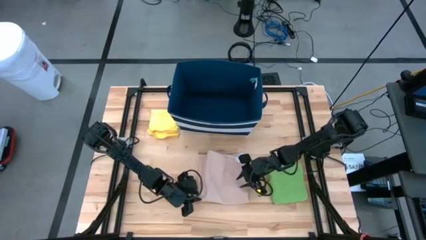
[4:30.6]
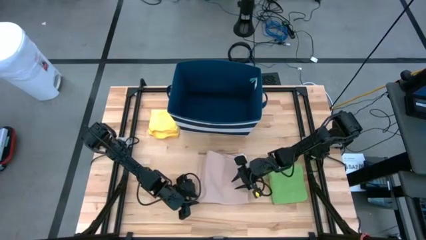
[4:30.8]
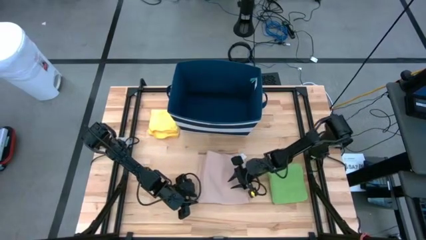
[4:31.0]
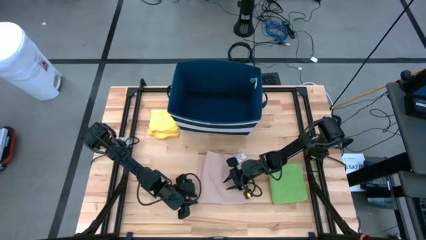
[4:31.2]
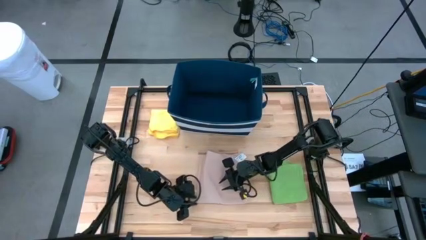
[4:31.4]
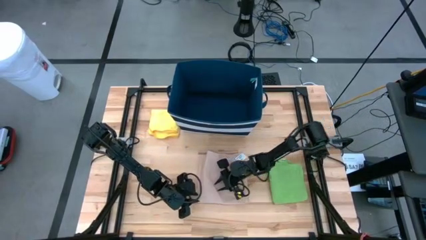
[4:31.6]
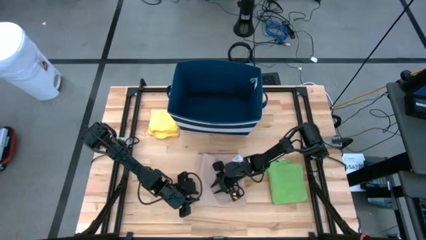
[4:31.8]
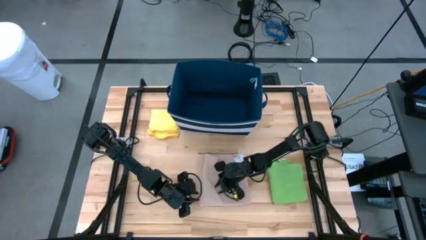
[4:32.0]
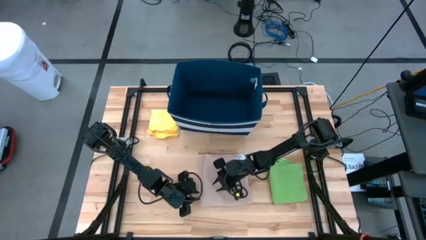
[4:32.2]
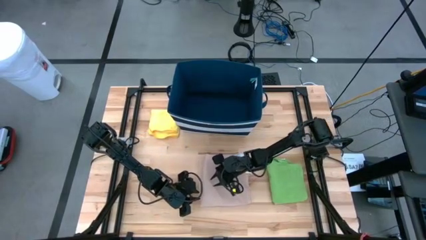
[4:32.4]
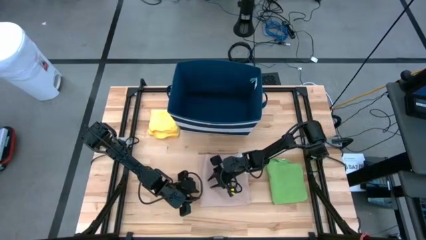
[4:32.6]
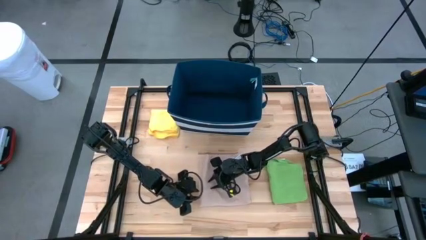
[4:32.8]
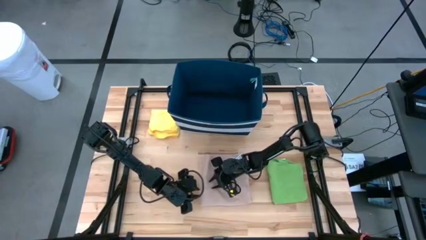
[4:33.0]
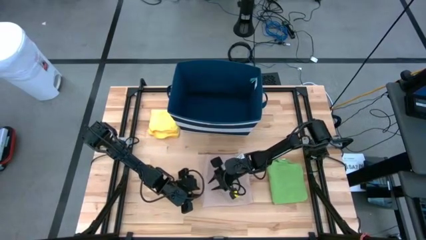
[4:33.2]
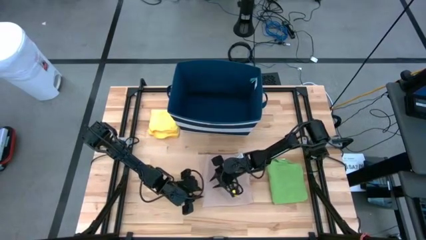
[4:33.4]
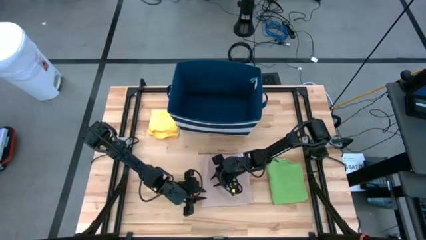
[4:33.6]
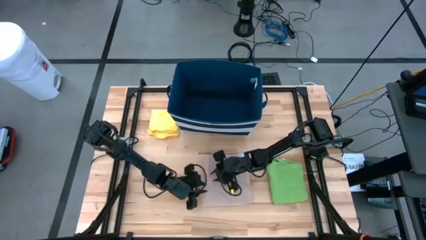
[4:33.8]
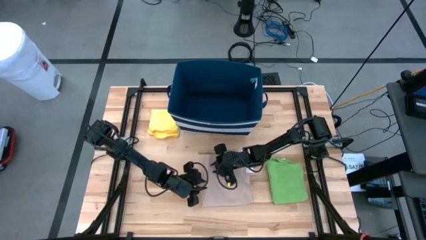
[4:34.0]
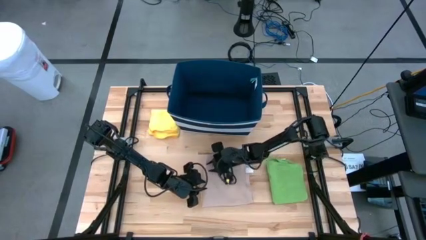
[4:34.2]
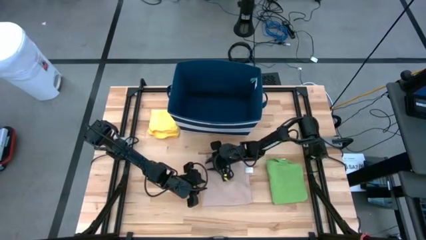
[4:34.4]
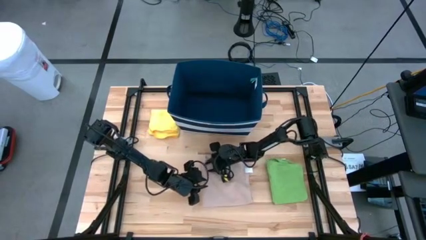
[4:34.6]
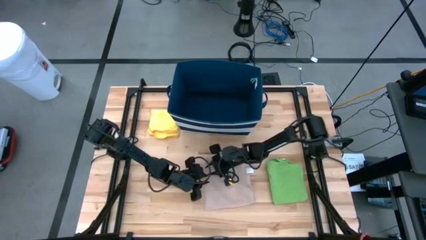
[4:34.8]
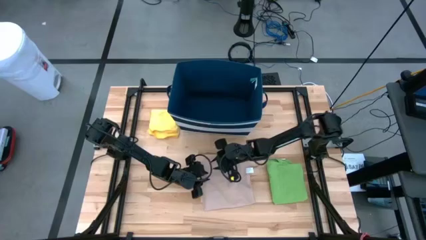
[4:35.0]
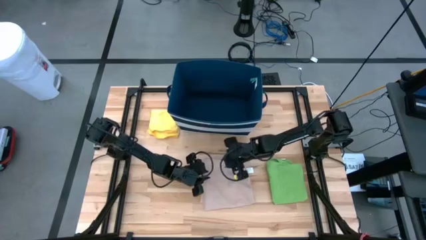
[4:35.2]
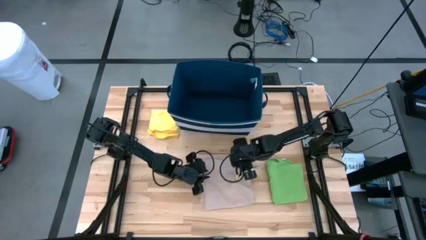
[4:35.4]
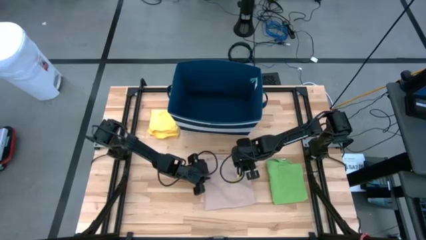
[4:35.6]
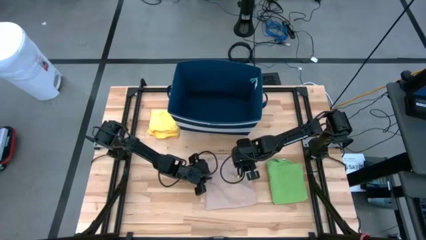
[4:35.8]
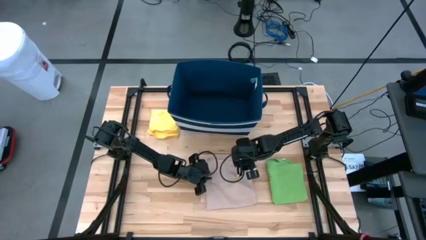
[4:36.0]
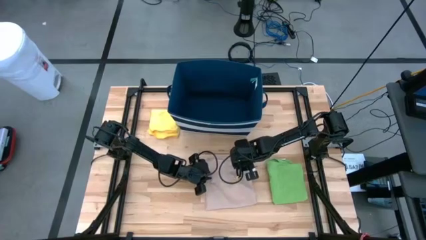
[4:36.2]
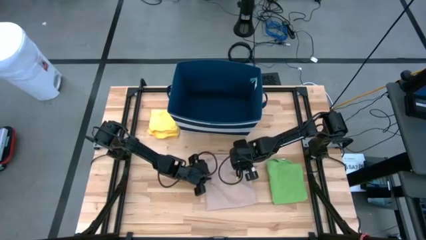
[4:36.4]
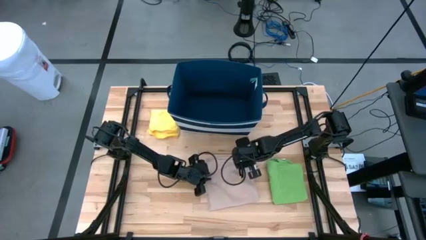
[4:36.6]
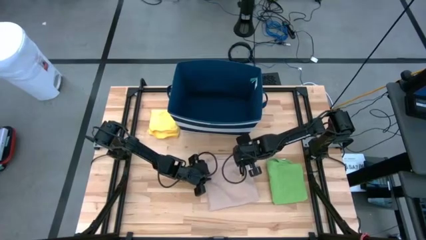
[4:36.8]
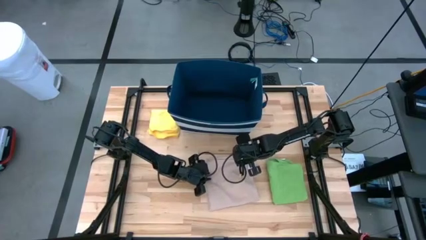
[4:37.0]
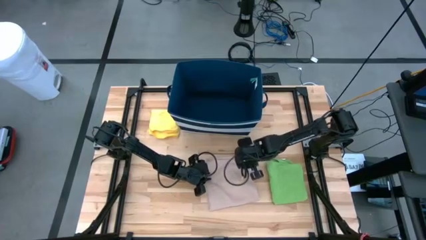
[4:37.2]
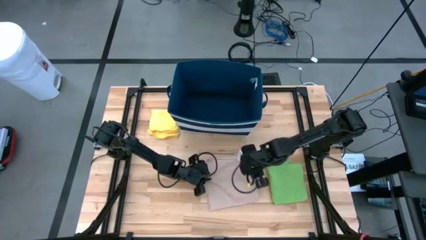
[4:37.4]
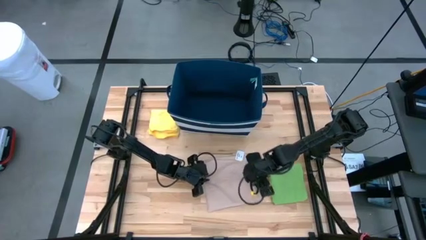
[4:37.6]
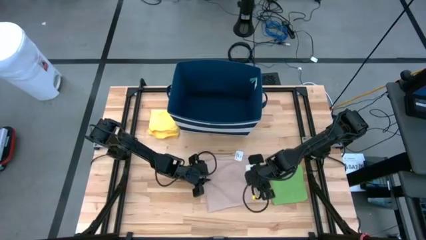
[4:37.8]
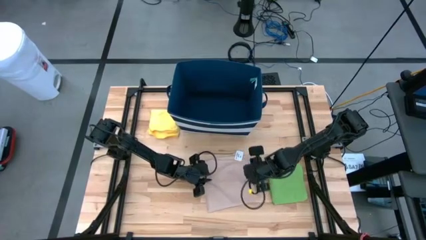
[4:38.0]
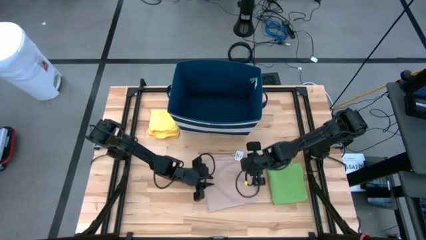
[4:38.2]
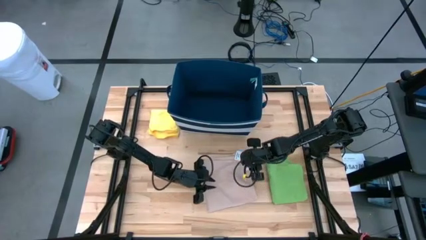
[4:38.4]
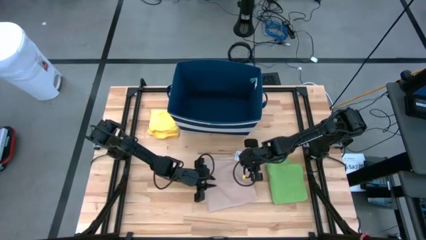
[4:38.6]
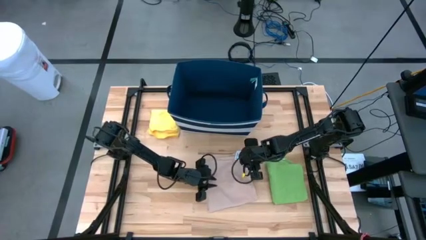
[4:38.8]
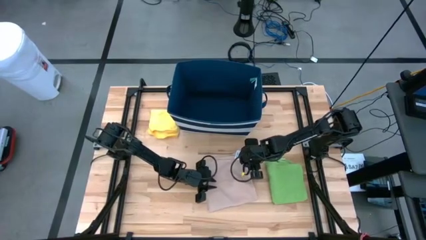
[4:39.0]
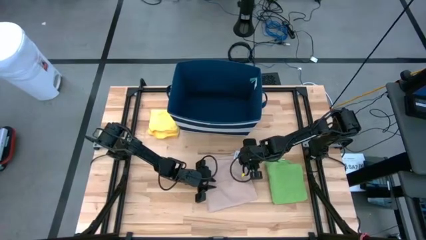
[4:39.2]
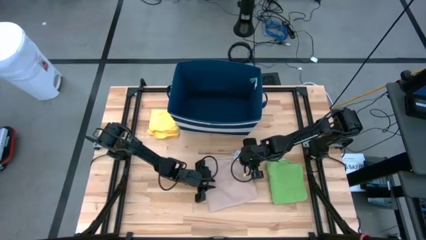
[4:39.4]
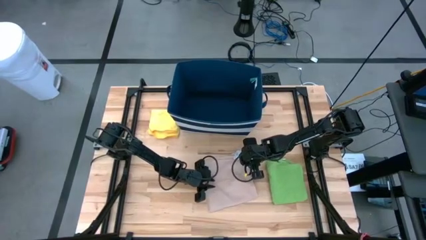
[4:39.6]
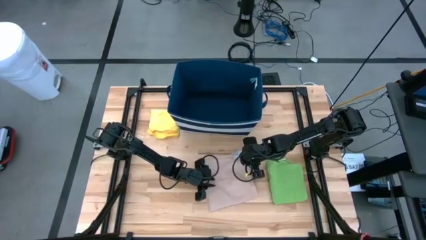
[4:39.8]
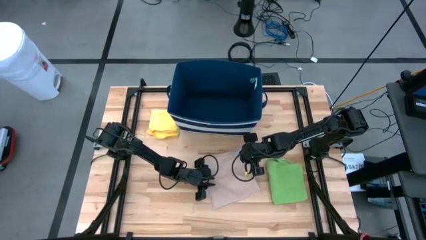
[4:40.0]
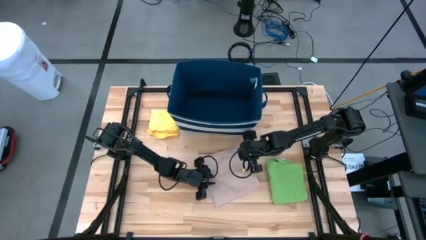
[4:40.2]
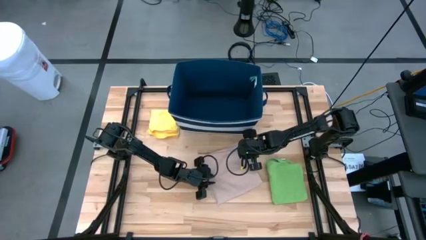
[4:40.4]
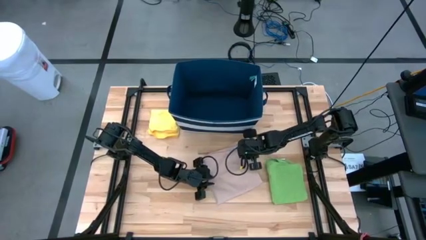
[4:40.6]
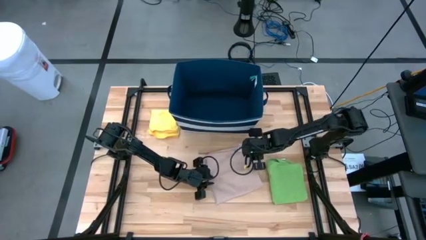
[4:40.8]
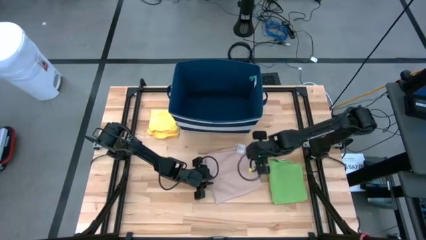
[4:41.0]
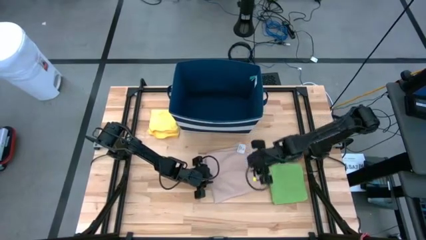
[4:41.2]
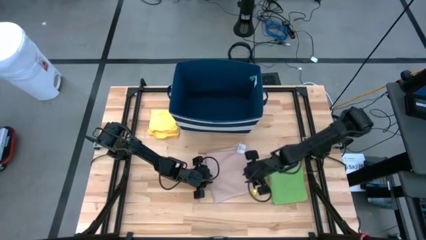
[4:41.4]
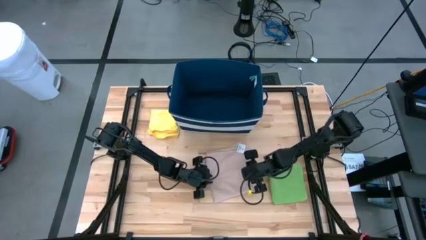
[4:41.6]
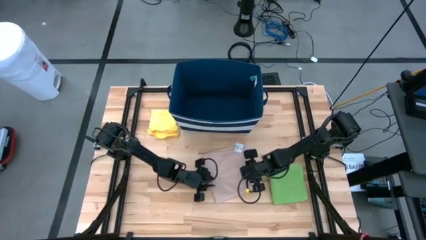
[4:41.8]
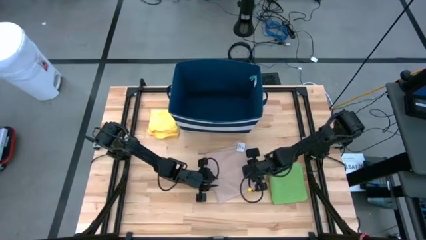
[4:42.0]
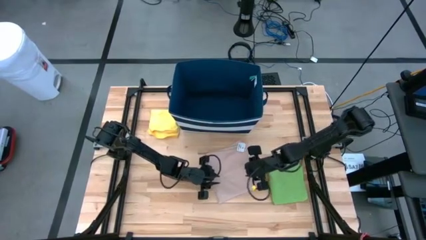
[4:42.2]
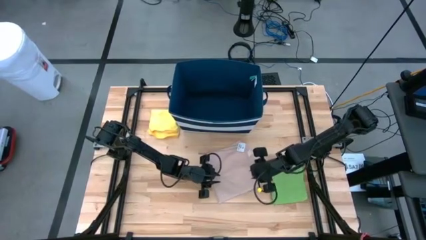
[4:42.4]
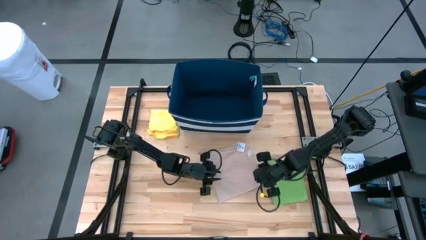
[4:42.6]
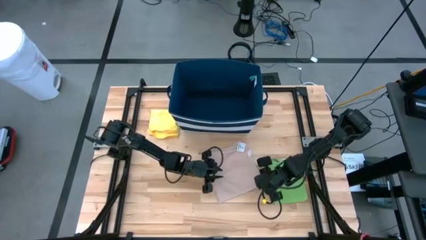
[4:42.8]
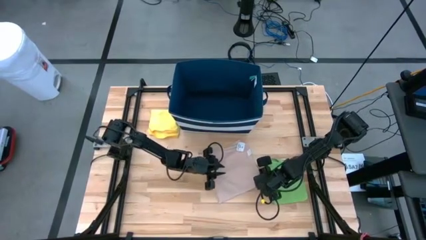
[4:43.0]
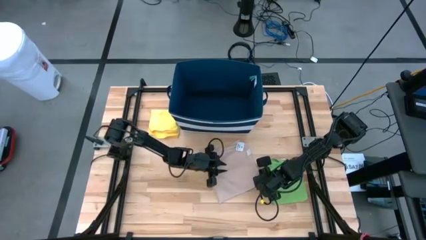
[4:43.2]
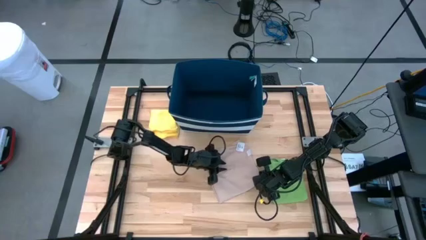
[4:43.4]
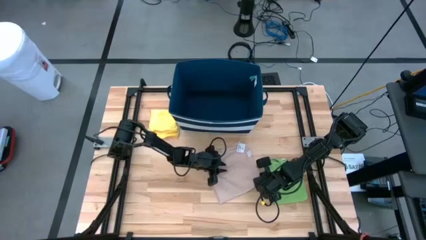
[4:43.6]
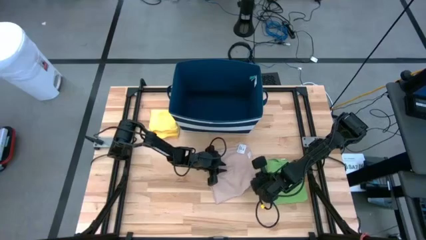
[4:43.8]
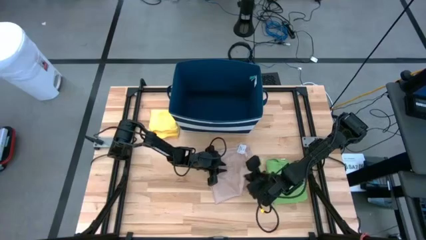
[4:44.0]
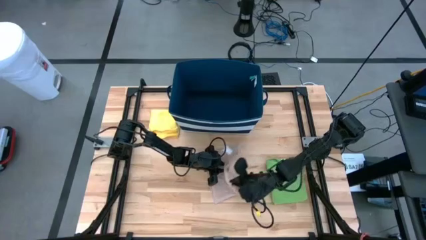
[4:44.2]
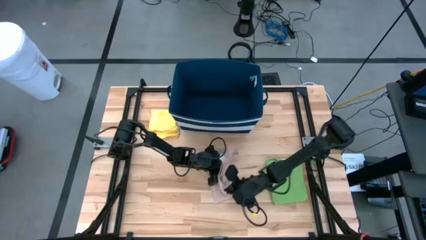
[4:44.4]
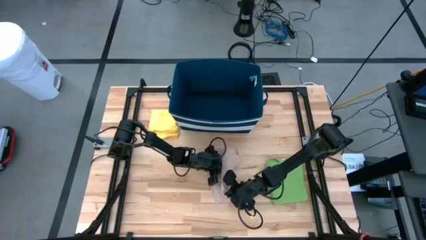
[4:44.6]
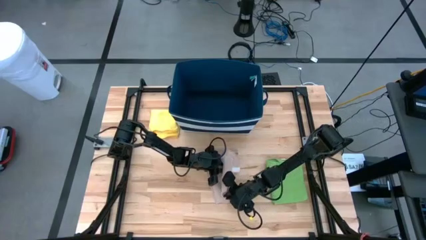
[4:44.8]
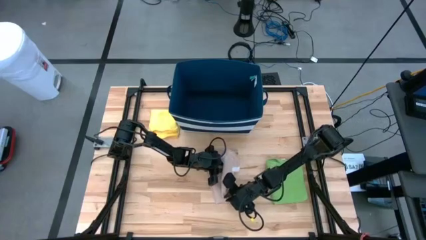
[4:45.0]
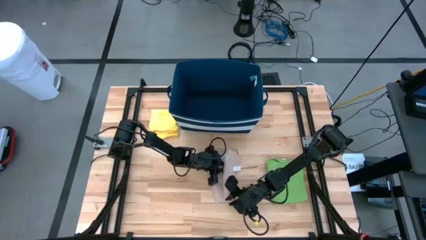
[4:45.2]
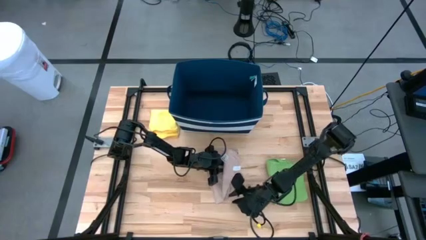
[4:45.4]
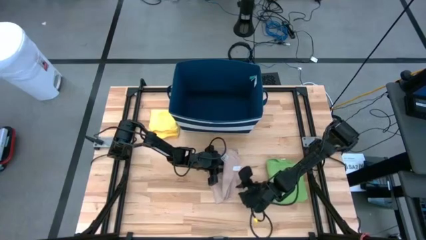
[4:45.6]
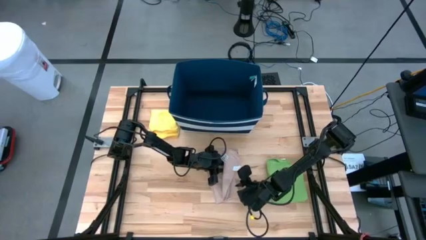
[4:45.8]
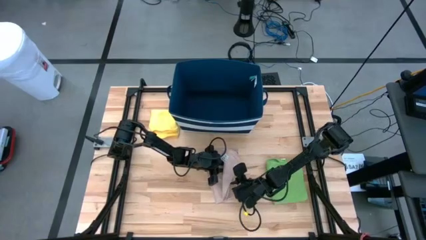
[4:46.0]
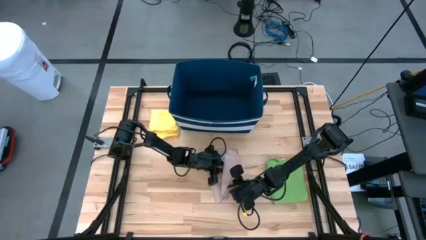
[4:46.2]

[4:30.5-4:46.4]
Task: Fold towel
Fold the light pink towel
